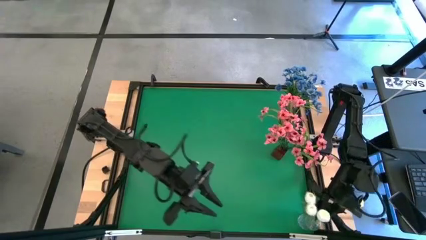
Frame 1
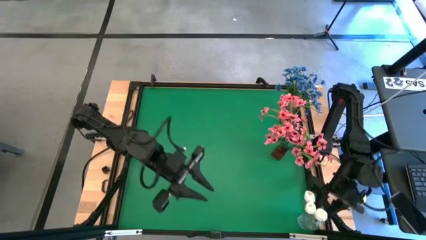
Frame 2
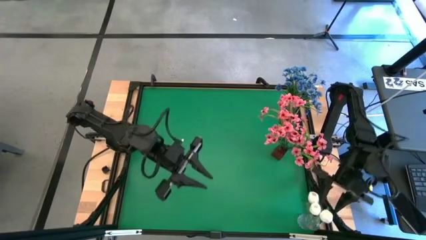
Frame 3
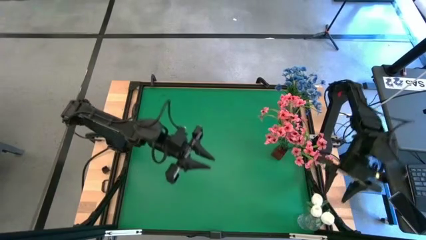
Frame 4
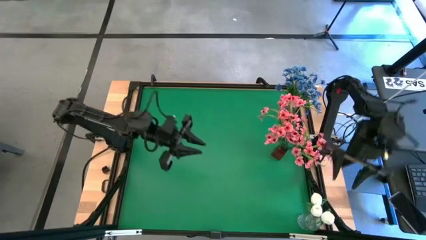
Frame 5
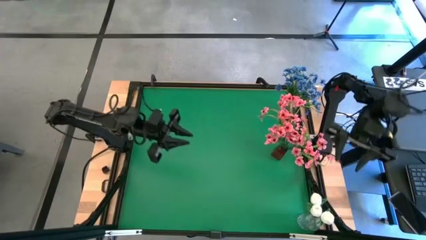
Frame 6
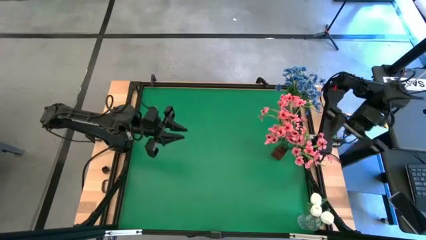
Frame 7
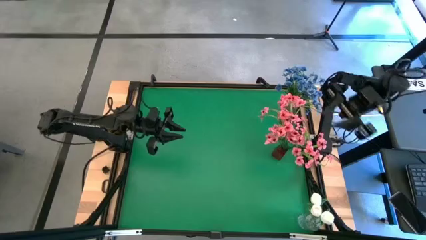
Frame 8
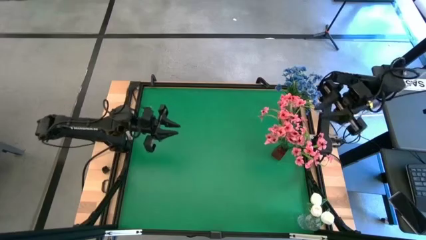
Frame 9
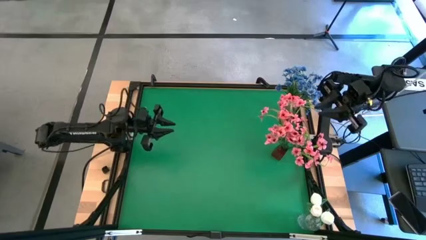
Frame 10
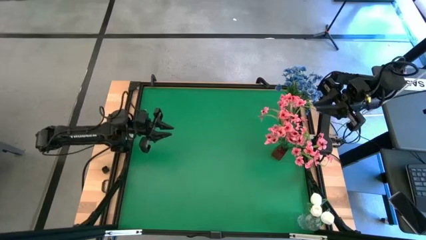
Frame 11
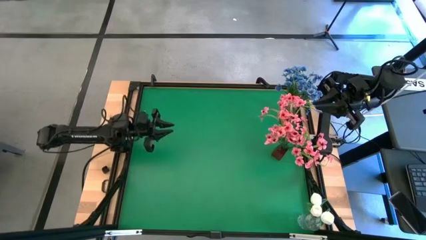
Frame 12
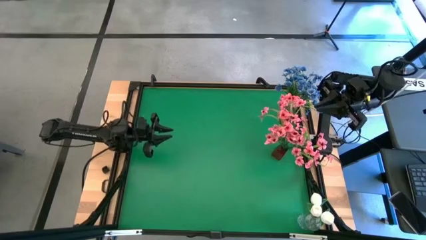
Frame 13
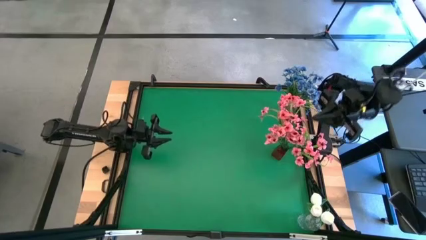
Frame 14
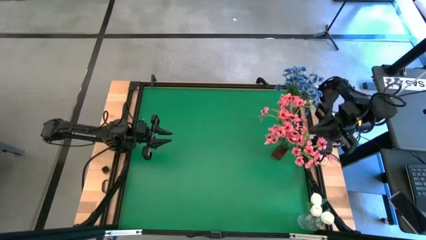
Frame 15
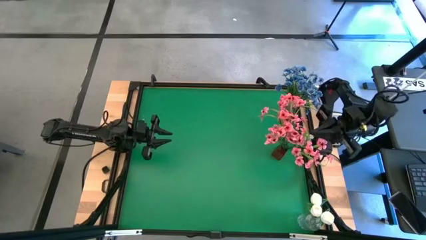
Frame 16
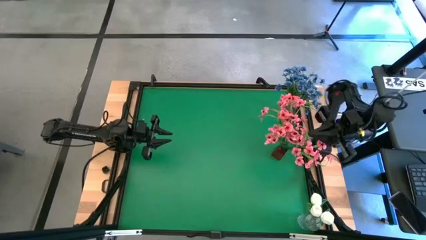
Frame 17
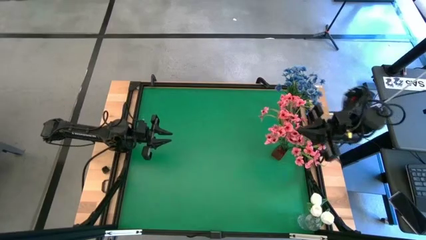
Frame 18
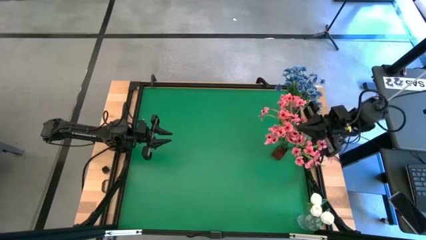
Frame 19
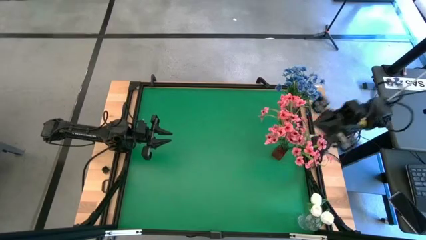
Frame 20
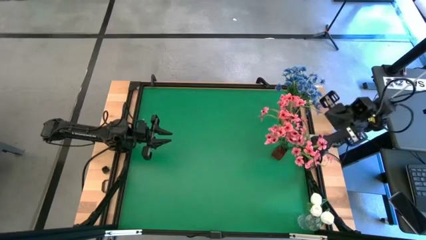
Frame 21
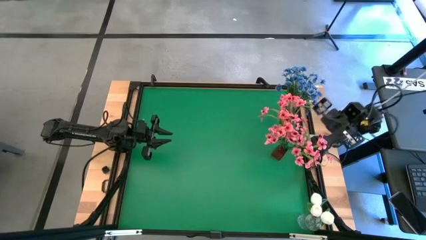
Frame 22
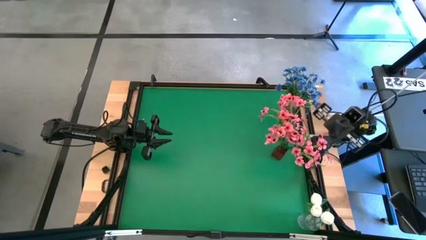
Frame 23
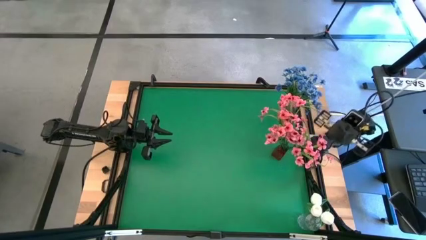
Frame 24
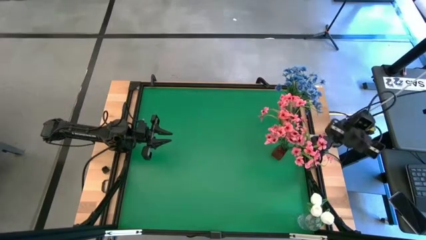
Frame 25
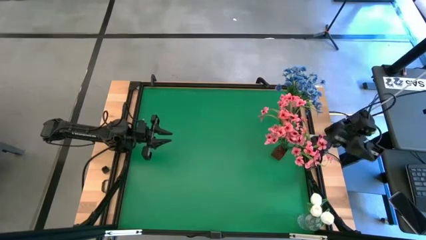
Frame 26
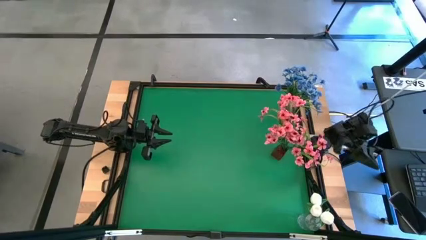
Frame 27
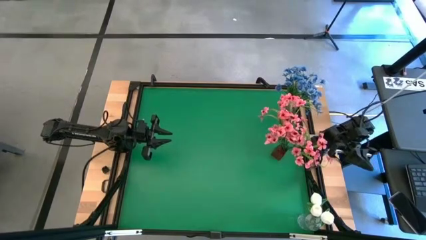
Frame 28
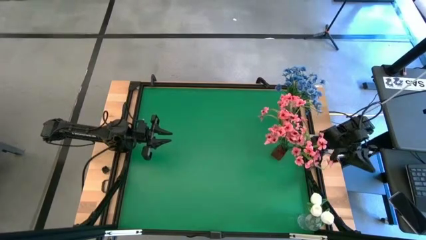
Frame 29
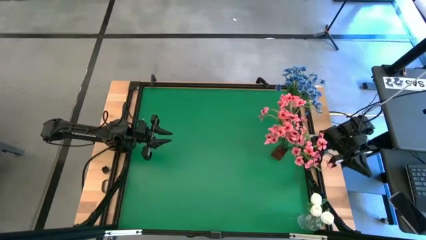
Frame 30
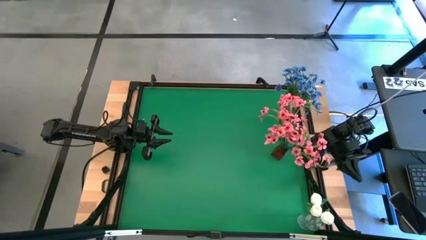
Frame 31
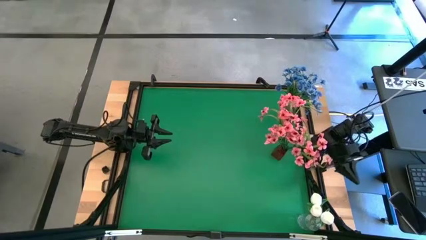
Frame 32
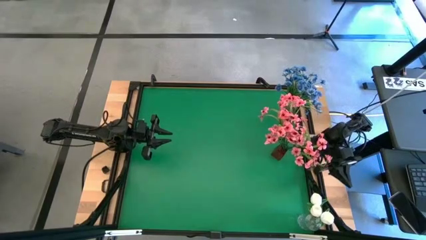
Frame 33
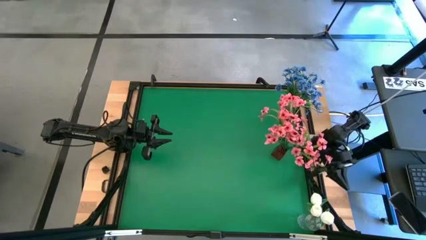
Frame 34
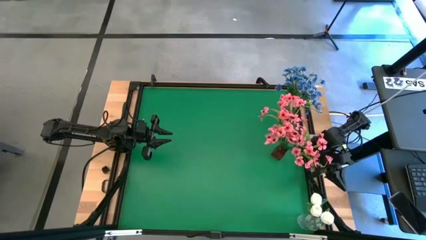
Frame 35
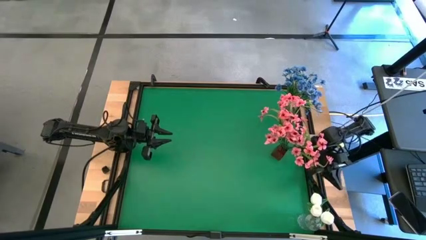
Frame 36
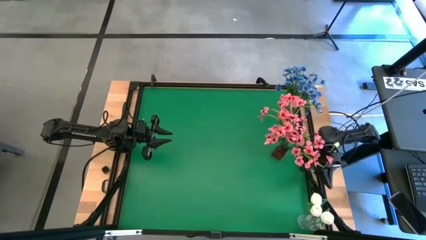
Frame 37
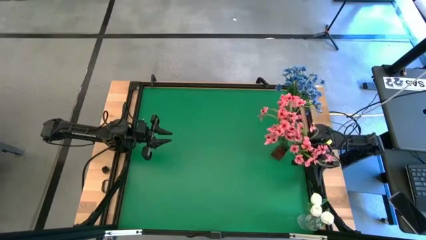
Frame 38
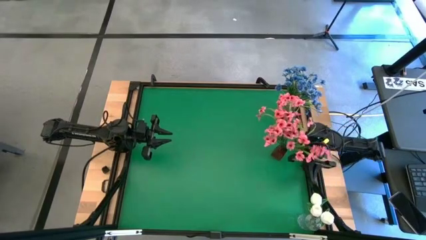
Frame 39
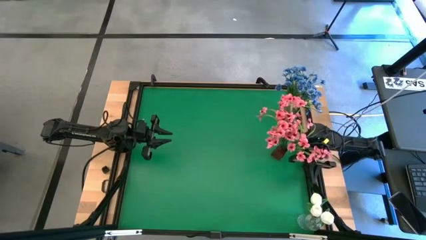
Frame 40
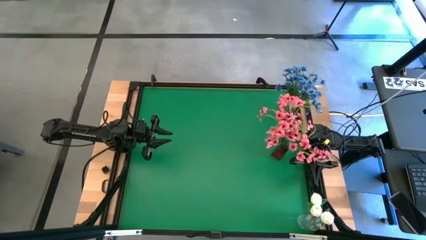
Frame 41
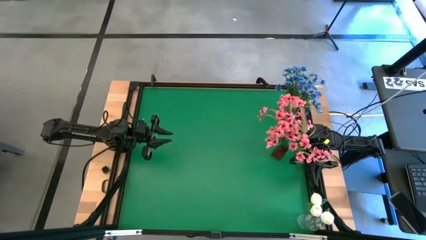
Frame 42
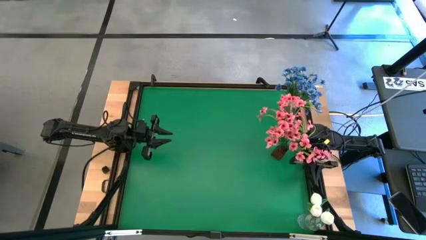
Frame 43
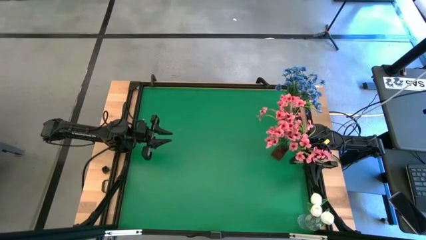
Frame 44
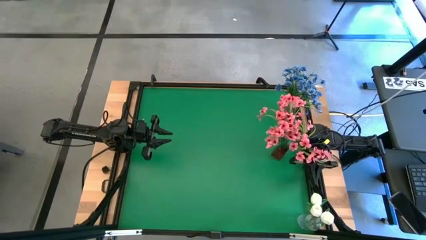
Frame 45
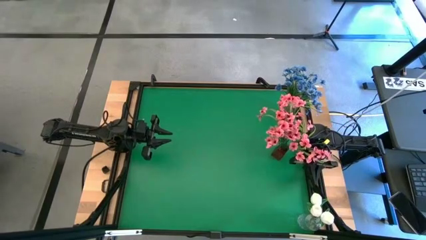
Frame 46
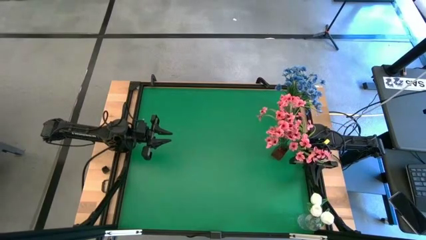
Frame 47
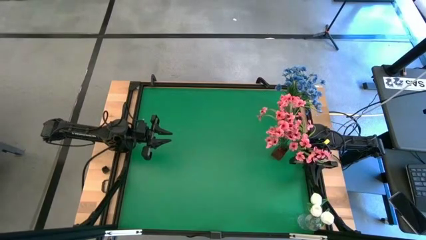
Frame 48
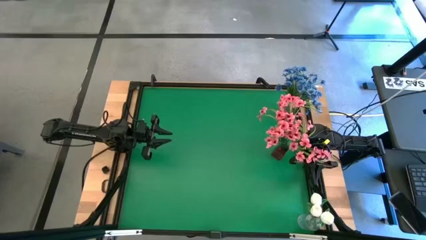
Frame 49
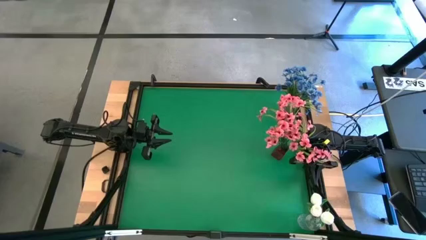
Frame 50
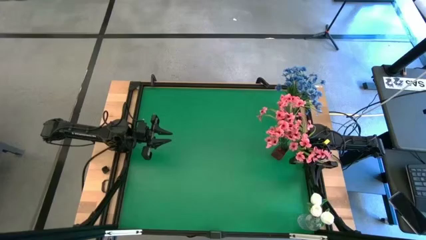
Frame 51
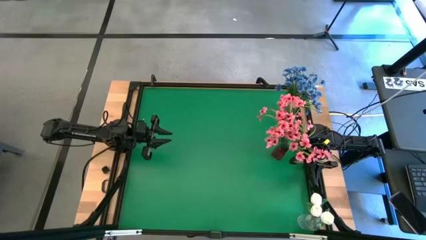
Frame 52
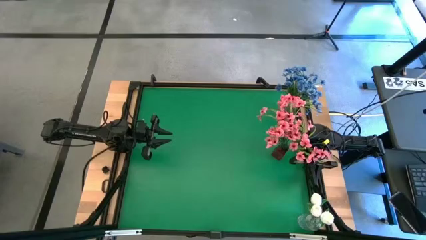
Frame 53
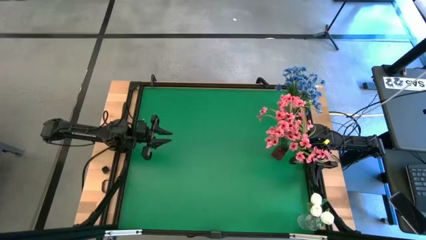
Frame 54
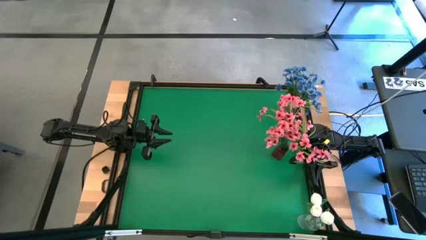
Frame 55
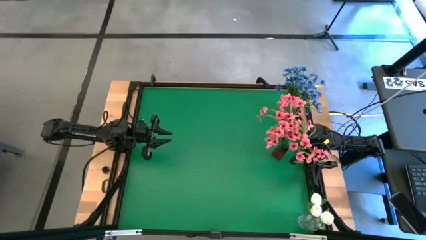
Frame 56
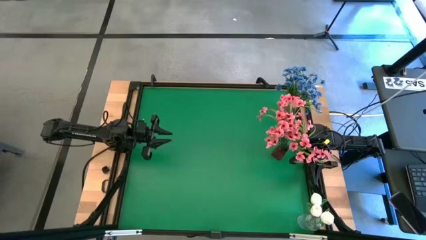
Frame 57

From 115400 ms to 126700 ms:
Task: Sort flowers into vase by color
Return to Home Position

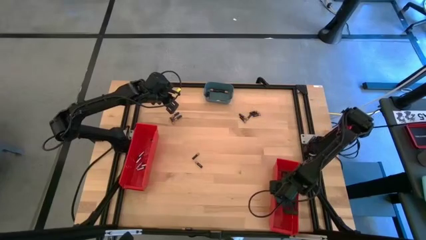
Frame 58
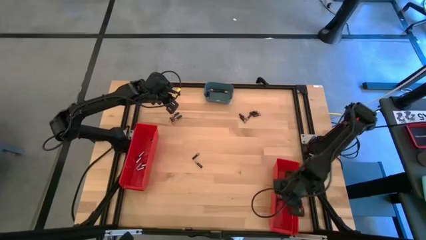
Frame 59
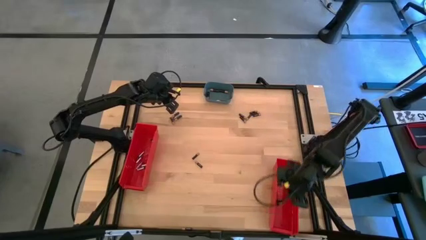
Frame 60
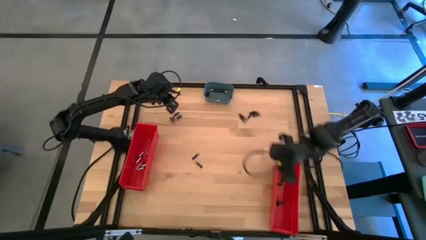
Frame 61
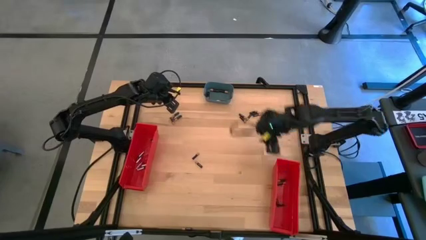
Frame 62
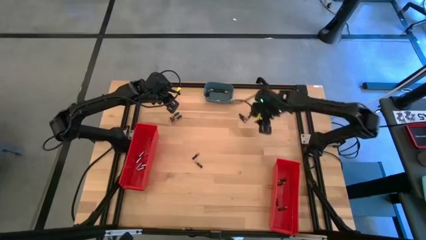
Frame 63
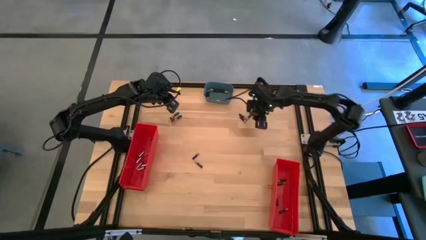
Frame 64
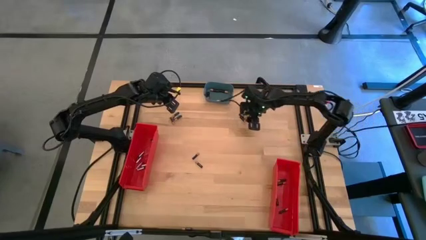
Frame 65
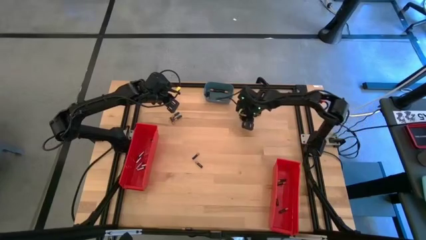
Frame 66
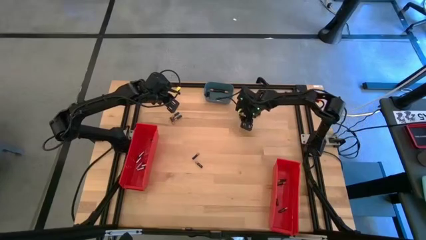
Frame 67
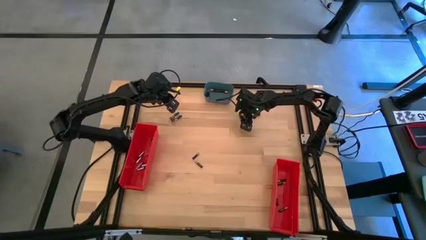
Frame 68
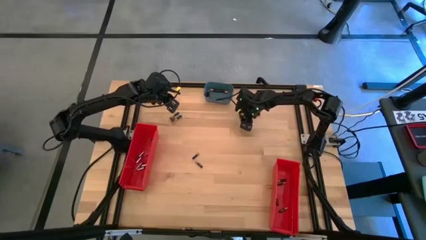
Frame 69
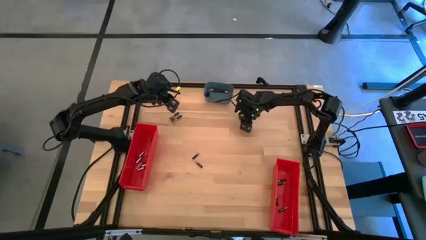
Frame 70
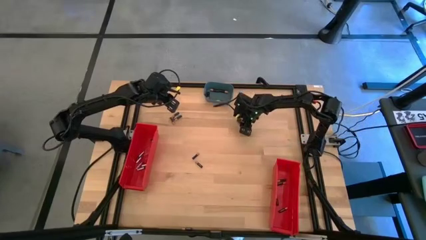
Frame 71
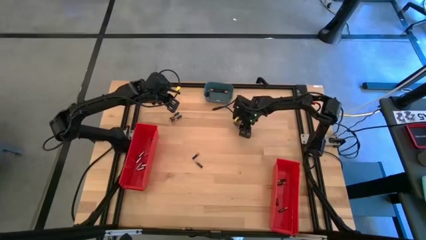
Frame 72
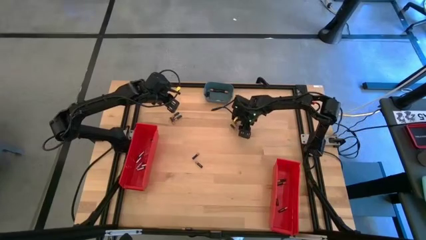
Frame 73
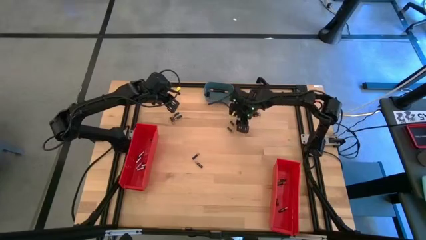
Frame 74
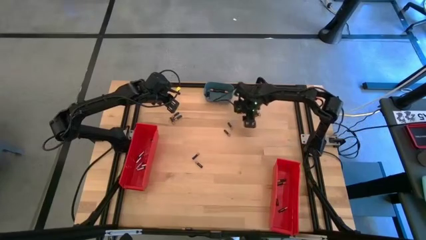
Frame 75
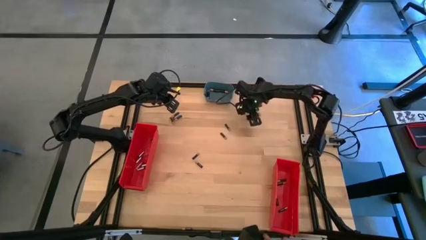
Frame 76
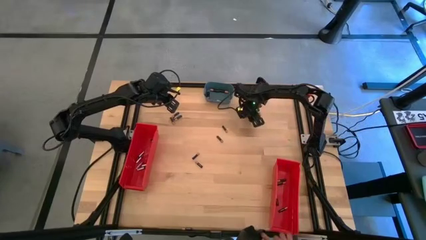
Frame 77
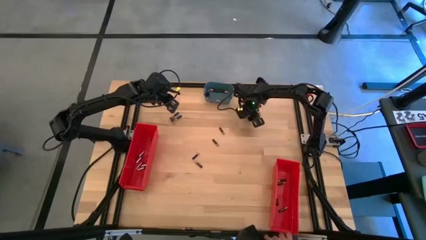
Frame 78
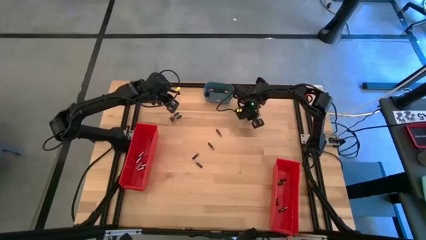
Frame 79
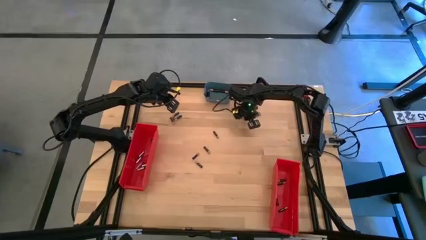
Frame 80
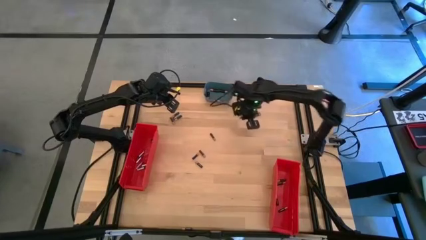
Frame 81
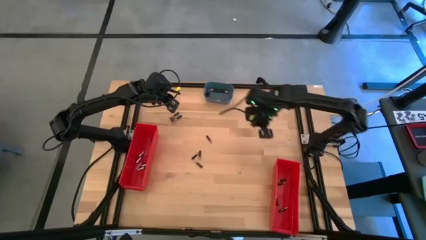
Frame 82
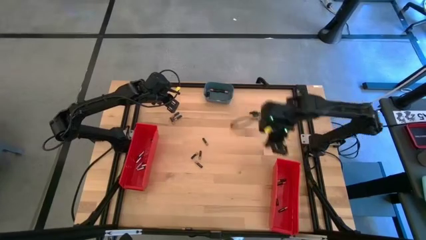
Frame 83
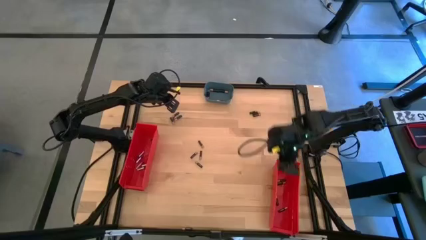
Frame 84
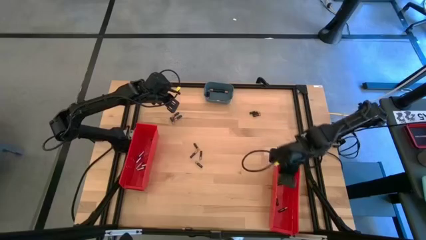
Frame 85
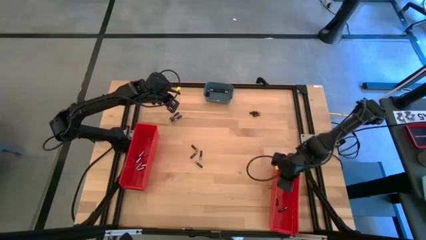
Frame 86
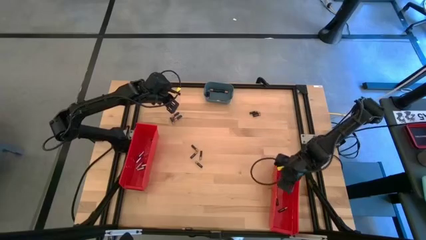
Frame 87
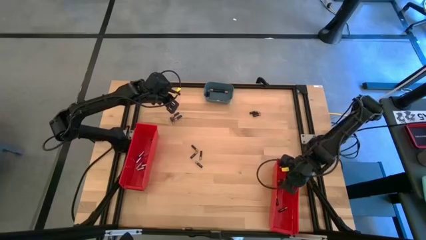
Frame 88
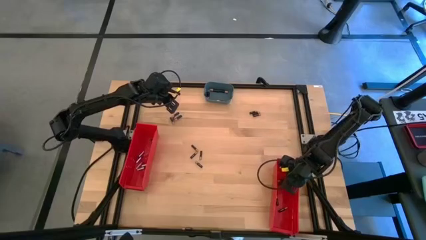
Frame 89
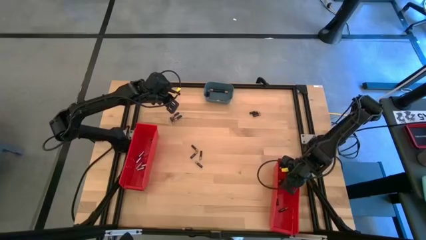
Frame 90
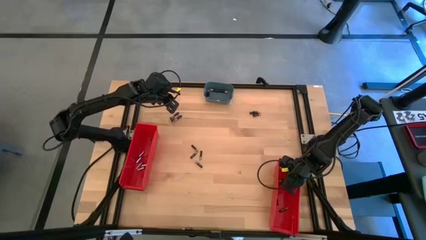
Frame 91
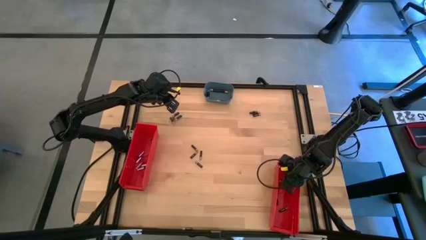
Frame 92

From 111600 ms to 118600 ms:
Task: Sort batteries
Put the small brown battery into the right red bin
